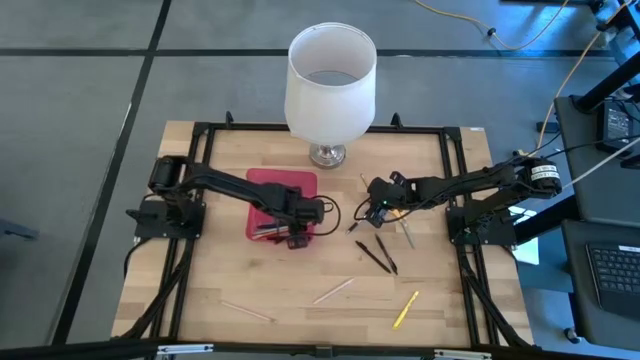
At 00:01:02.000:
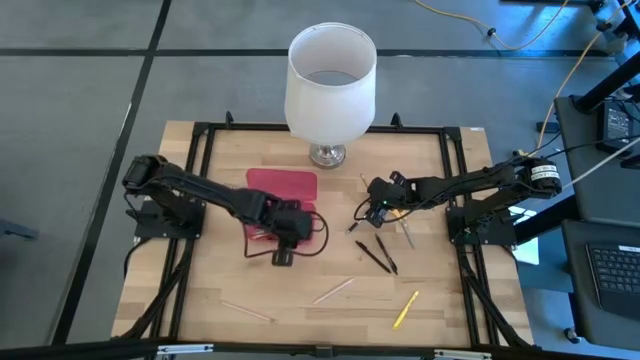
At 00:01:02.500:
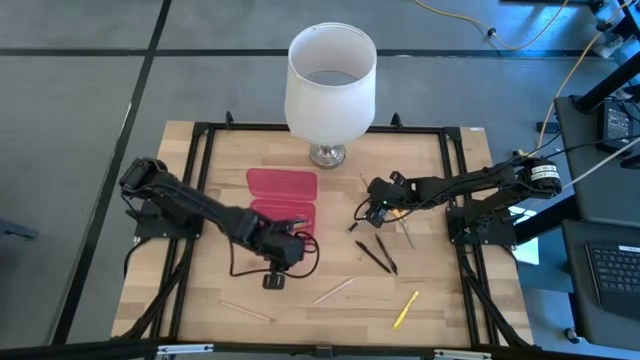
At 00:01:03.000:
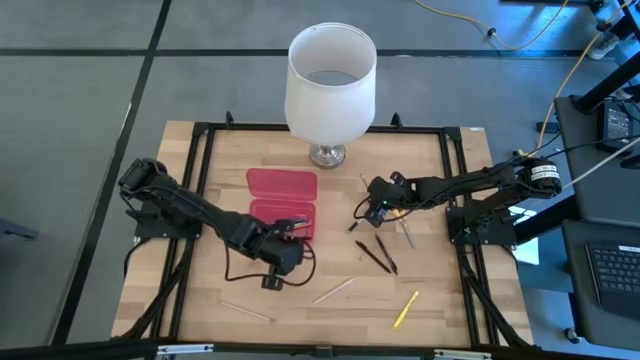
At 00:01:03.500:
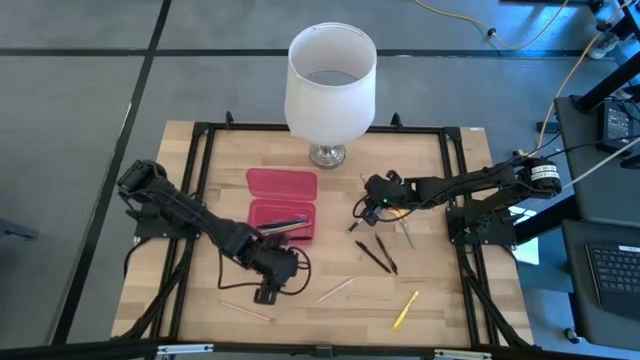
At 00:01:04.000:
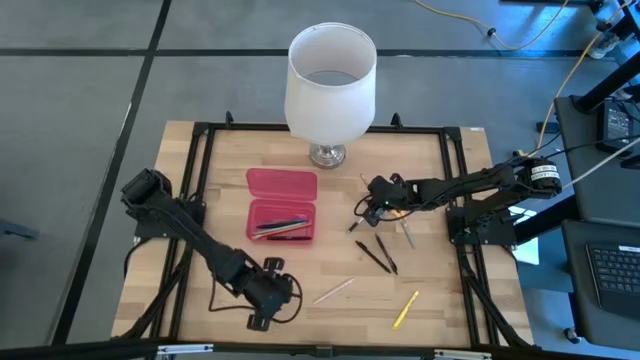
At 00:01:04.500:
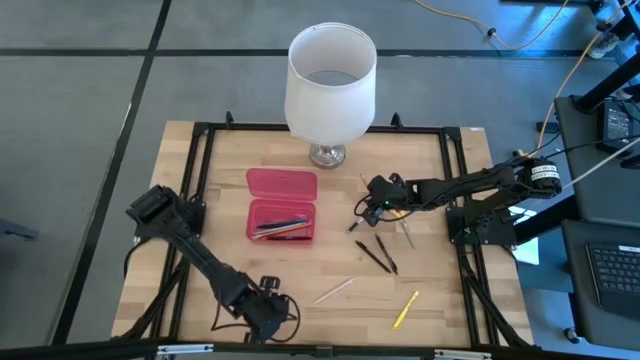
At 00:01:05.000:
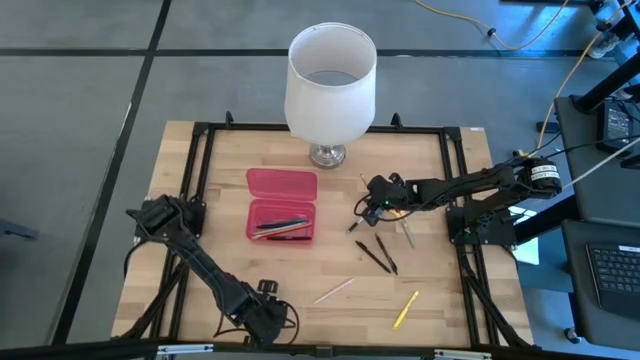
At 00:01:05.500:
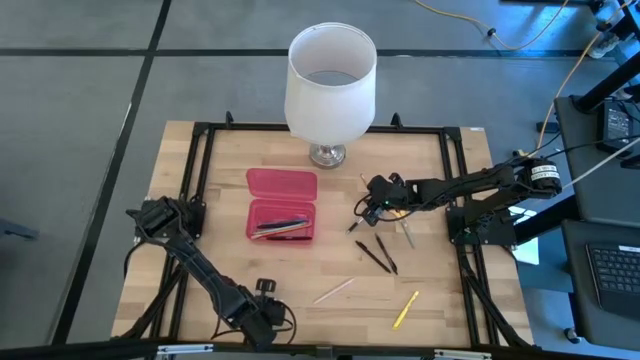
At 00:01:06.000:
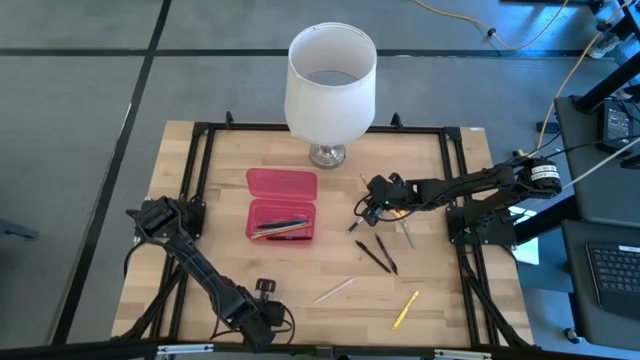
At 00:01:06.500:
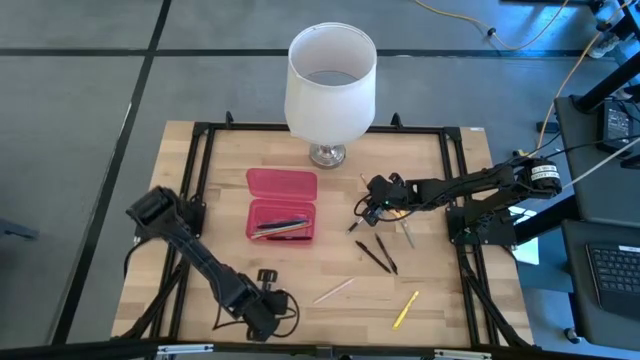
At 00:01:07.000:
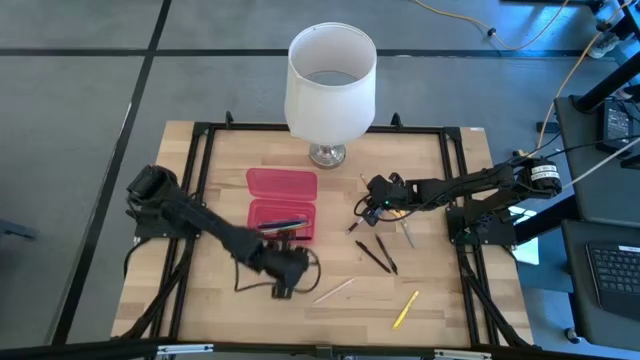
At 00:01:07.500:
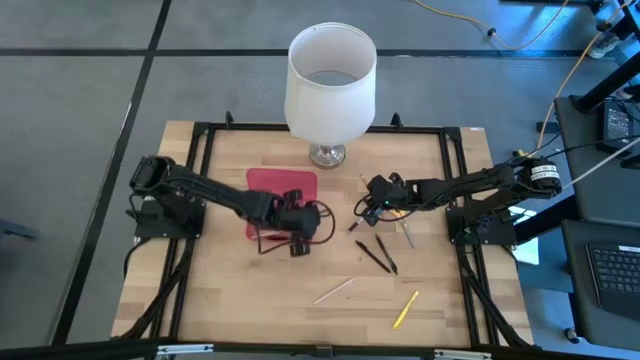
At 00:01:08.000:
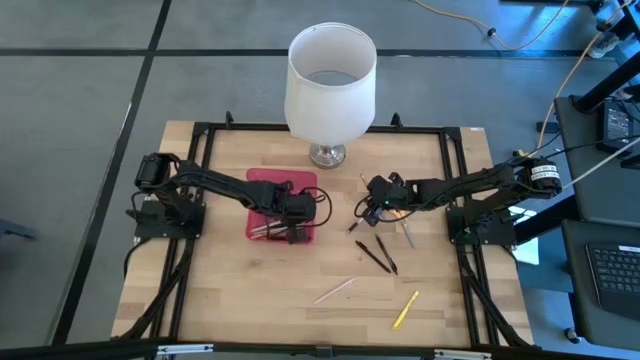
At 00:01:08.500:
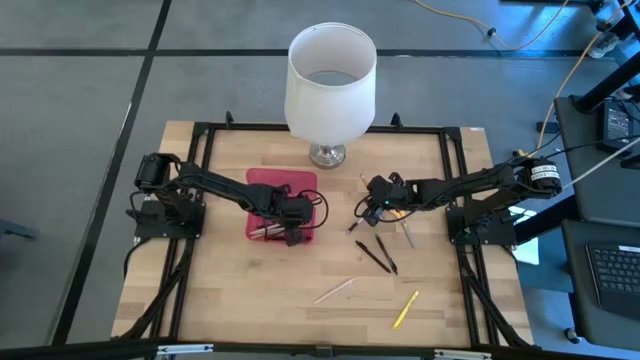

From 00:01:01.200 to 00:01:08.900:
Task: Pick & place school supplies into a supply box
Put the light pink pencil into the red supply box

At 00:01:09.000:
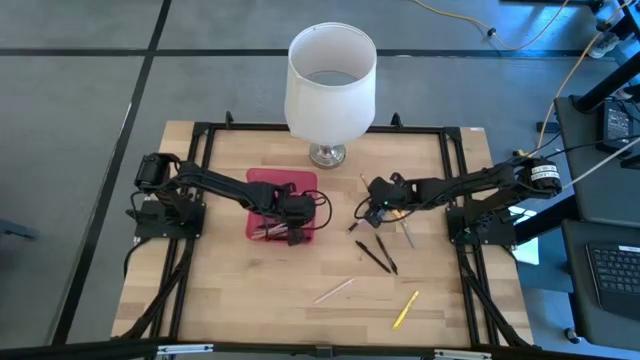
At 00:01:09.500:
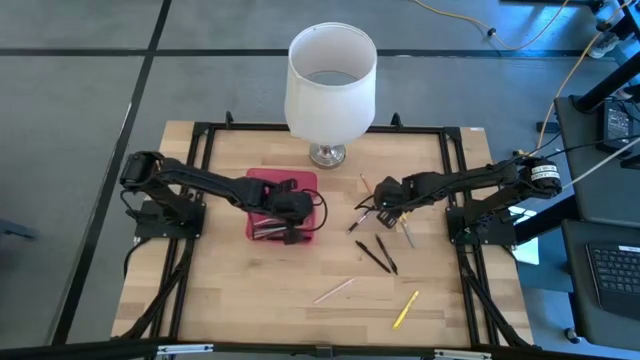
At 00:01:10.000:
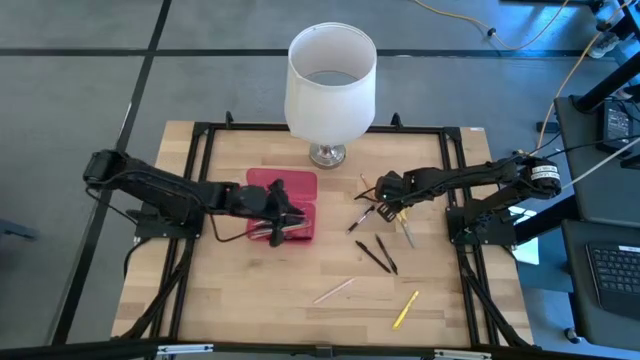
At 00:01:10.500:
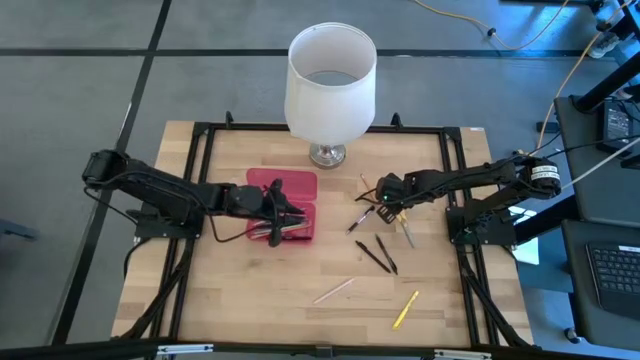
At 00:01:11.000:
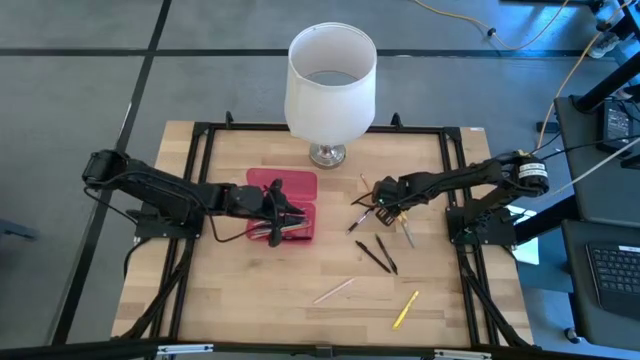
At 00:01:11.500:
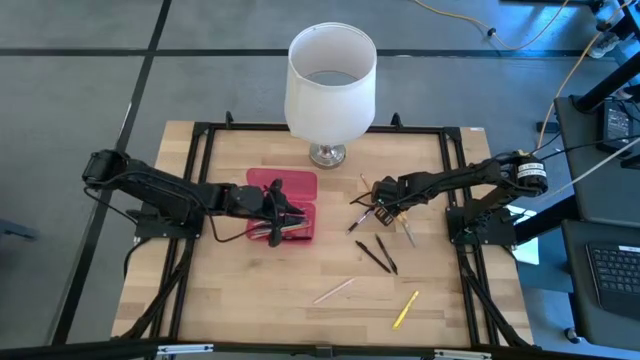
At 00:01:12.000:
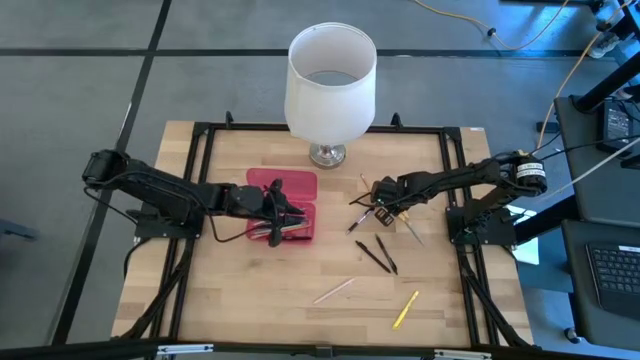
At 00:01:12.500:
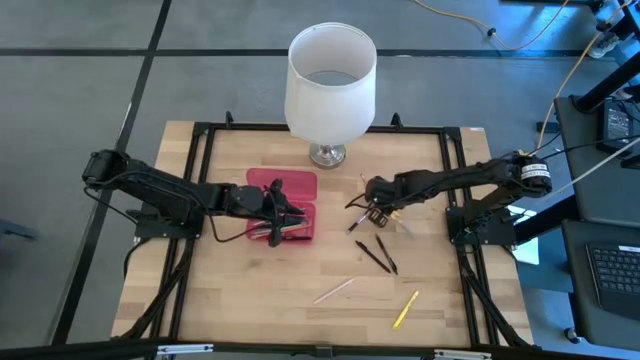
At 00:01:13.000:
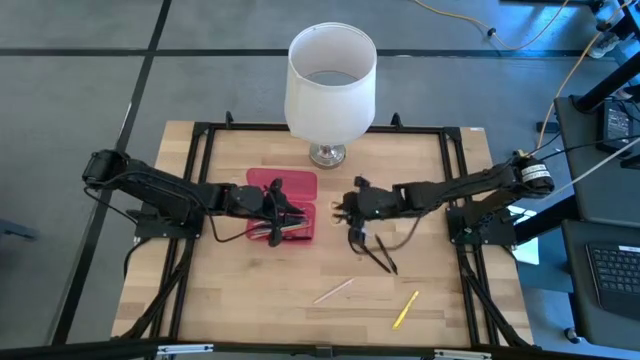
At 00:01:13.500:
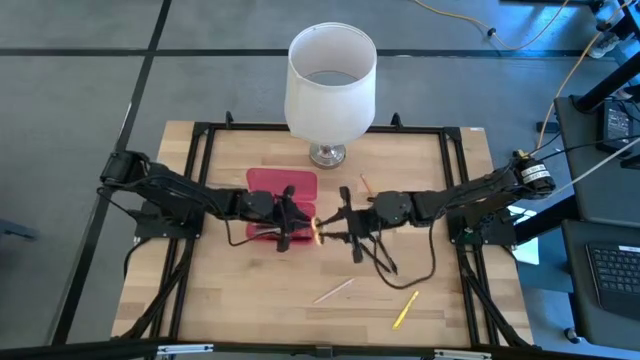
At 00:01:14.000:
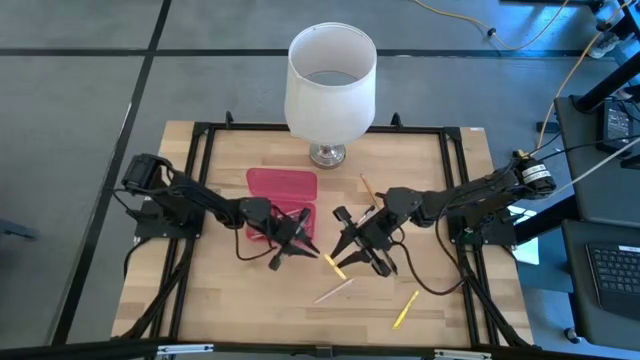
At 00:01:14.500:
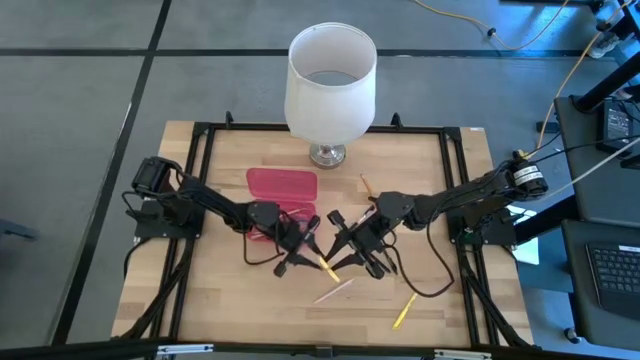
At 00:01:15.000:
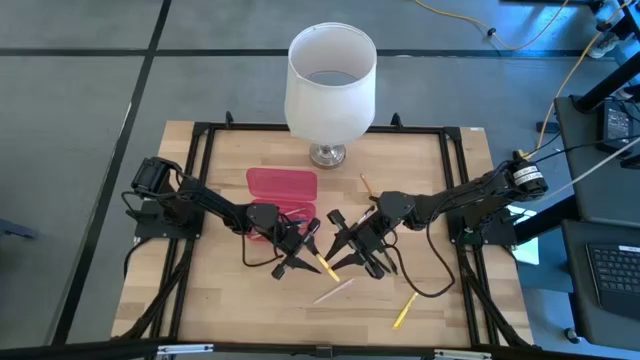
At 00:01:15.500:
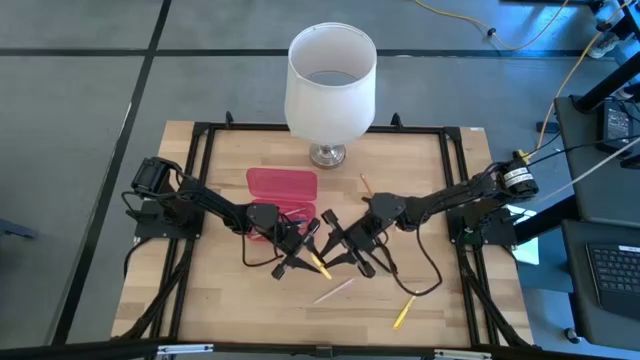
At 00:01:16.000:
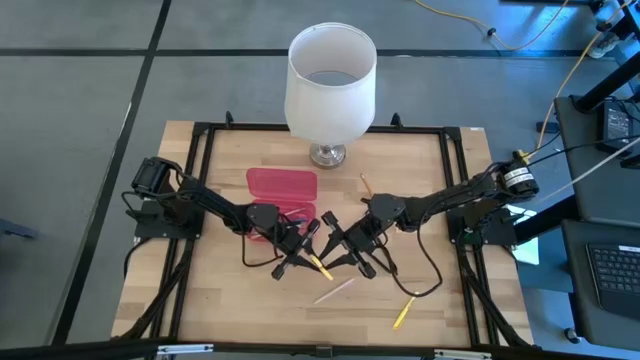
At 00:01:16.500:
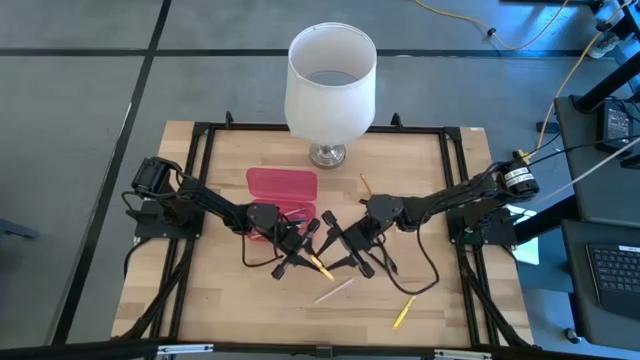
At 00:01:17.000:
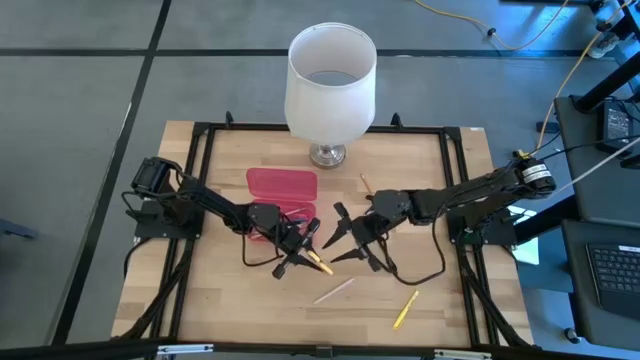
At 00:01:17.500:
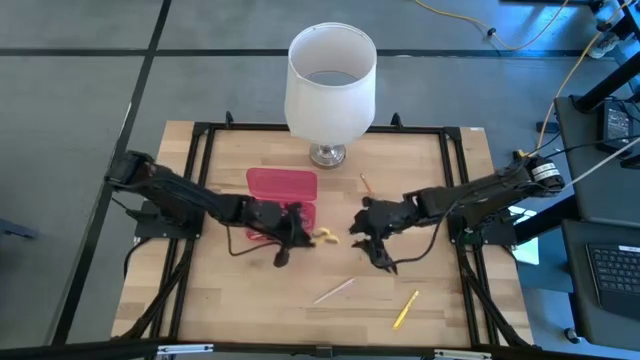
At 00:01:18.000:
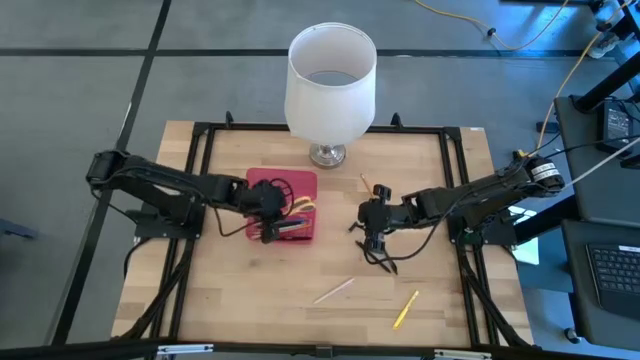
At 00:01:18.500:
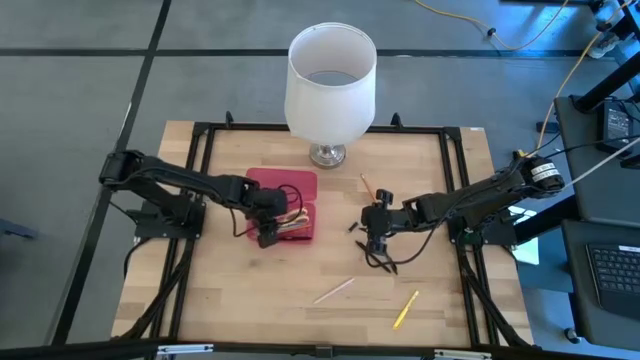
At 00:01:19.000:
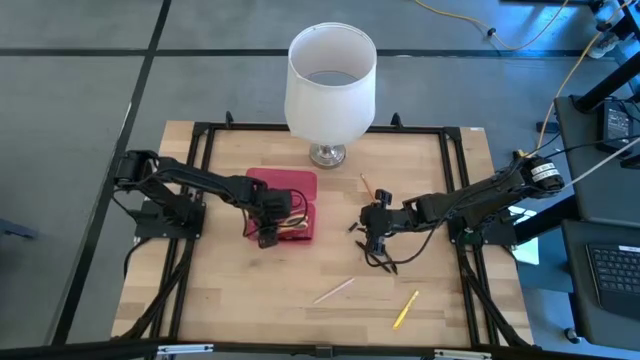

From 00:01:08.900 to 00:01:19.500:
Put the yellow scissors into the red supply box
